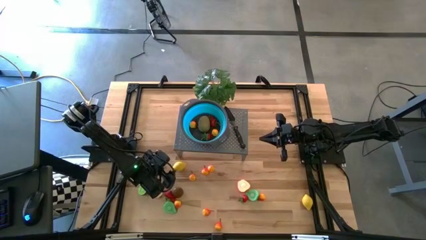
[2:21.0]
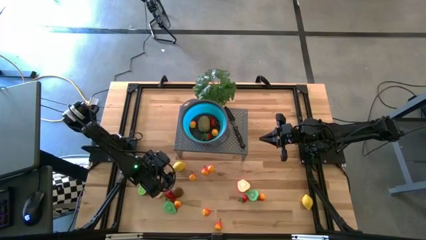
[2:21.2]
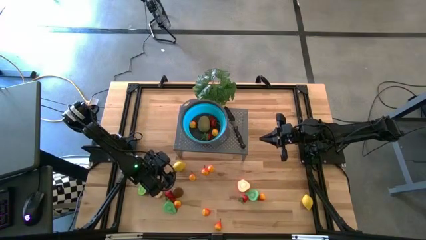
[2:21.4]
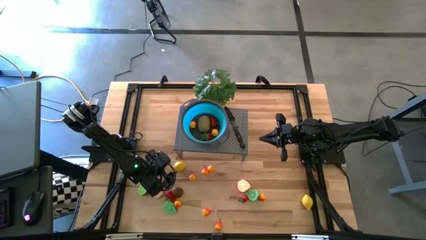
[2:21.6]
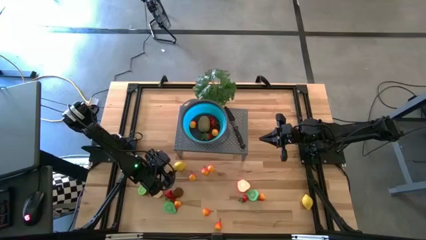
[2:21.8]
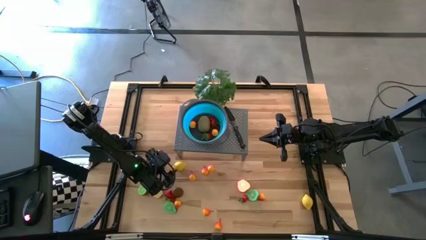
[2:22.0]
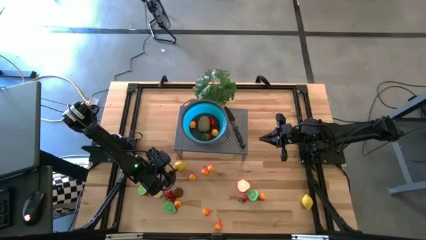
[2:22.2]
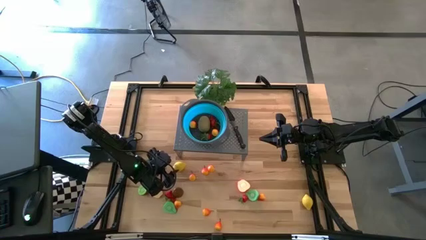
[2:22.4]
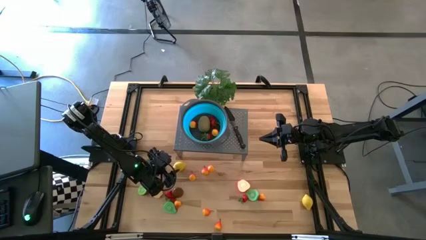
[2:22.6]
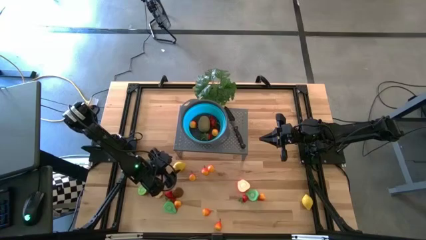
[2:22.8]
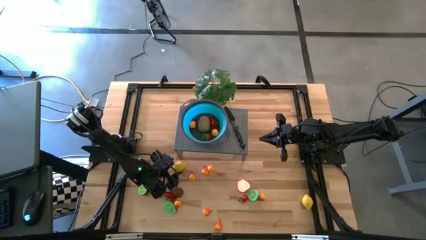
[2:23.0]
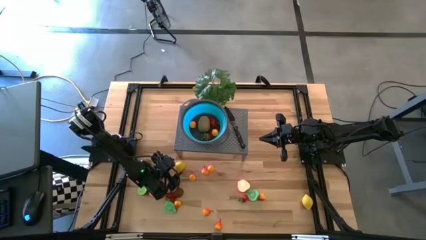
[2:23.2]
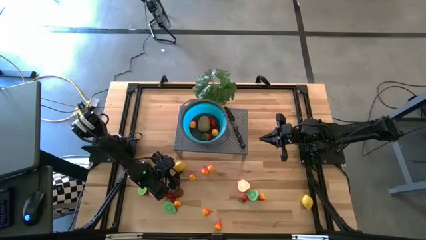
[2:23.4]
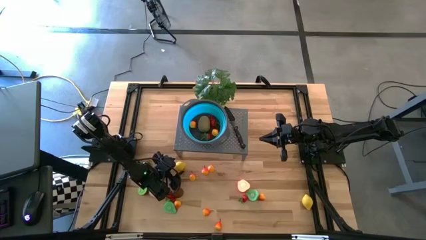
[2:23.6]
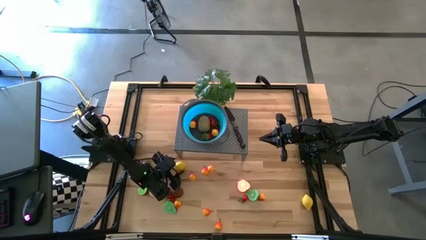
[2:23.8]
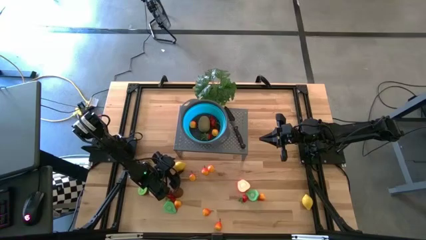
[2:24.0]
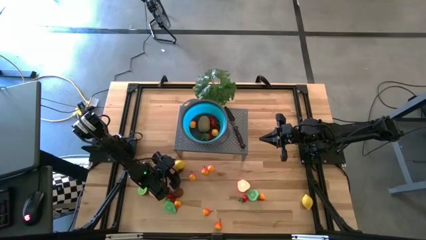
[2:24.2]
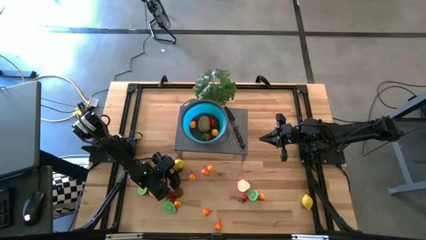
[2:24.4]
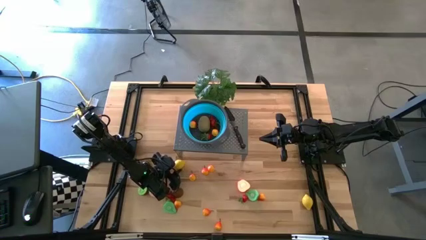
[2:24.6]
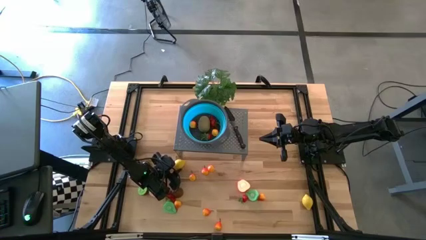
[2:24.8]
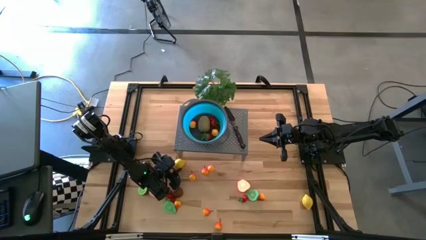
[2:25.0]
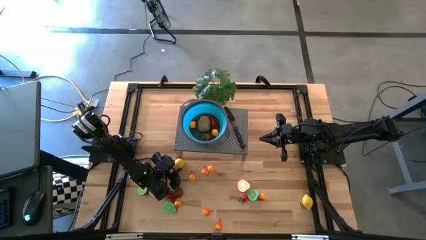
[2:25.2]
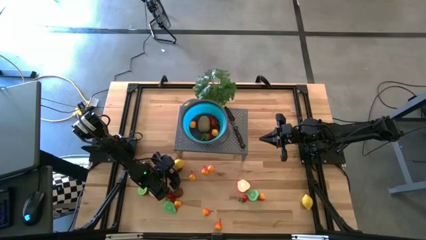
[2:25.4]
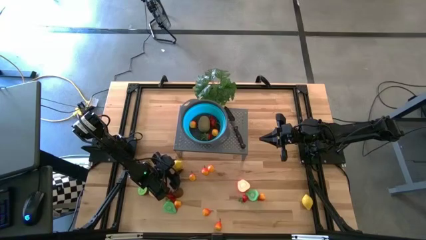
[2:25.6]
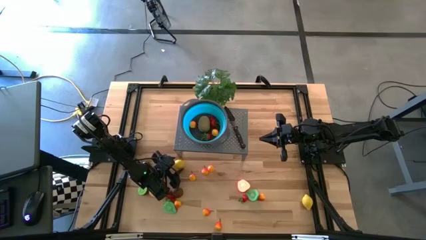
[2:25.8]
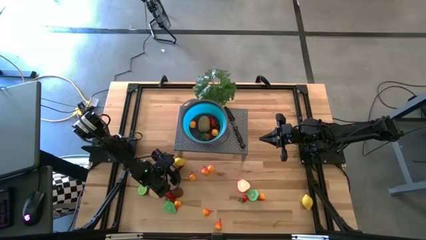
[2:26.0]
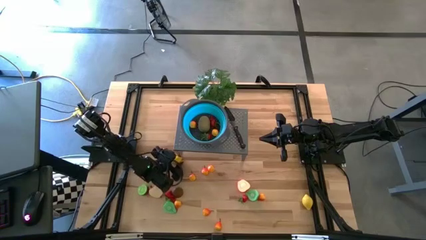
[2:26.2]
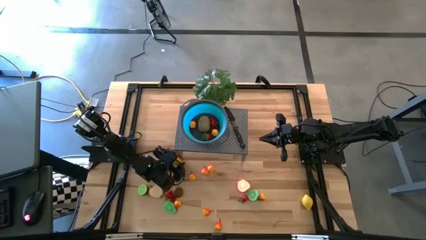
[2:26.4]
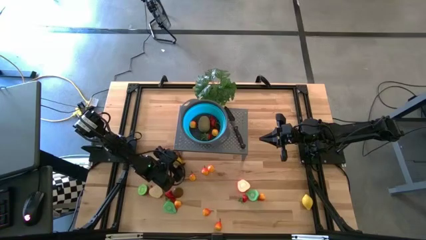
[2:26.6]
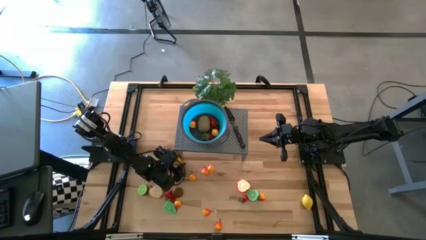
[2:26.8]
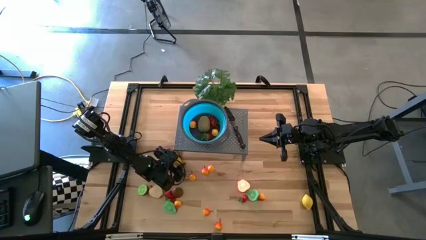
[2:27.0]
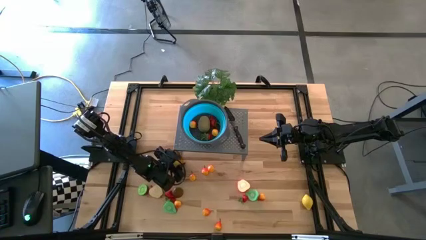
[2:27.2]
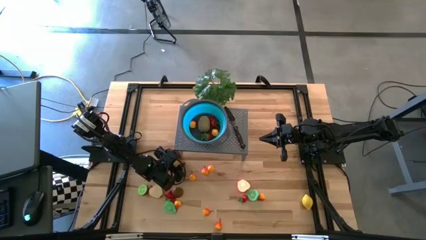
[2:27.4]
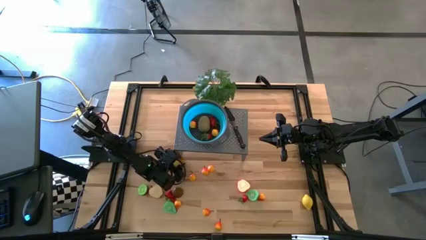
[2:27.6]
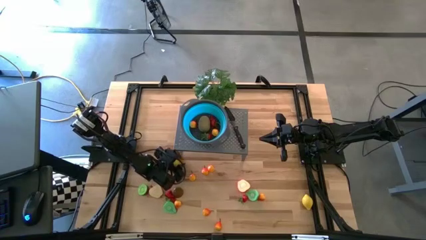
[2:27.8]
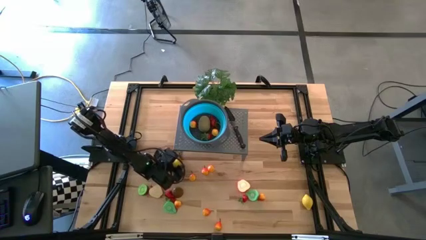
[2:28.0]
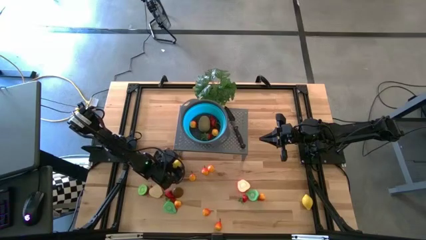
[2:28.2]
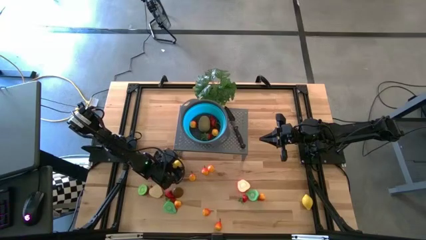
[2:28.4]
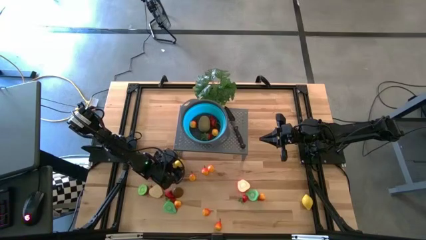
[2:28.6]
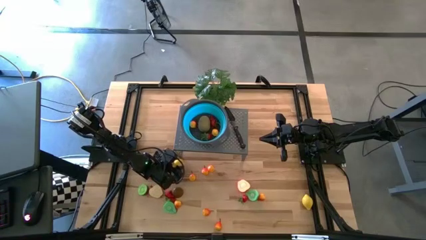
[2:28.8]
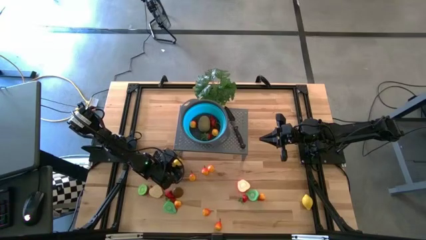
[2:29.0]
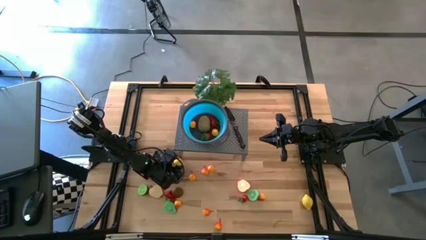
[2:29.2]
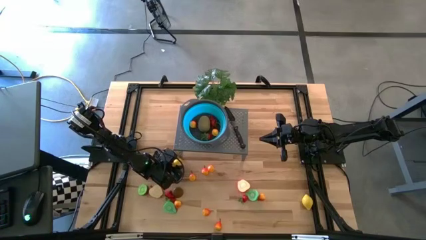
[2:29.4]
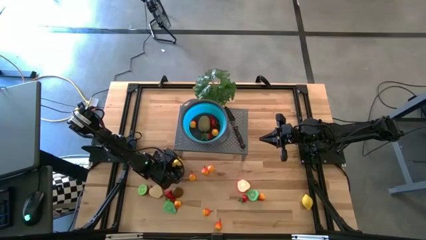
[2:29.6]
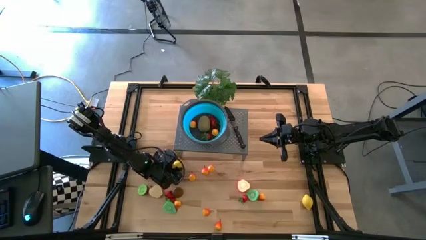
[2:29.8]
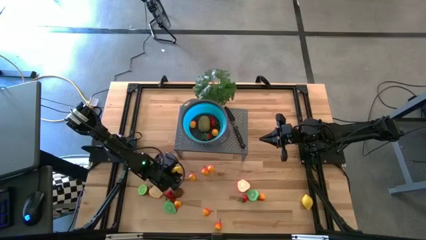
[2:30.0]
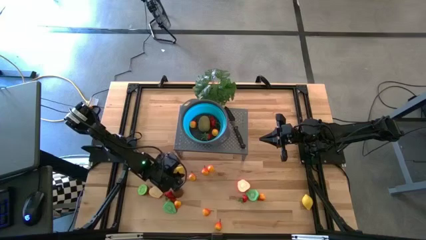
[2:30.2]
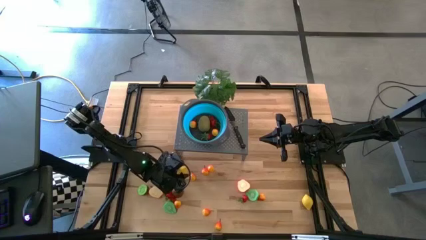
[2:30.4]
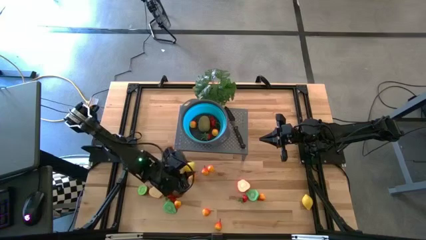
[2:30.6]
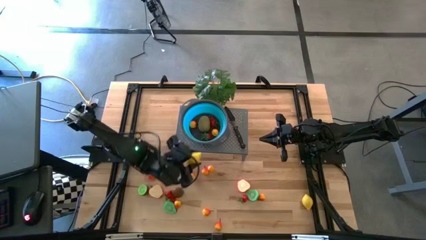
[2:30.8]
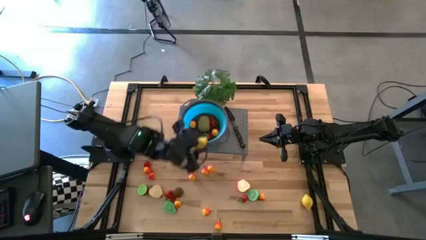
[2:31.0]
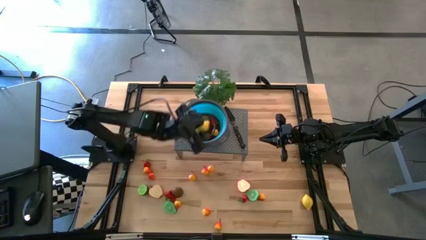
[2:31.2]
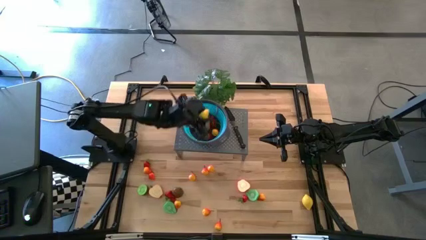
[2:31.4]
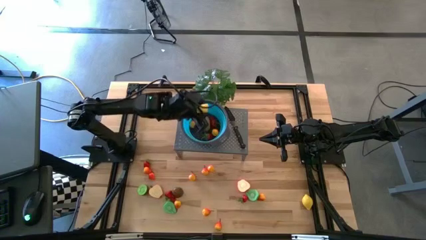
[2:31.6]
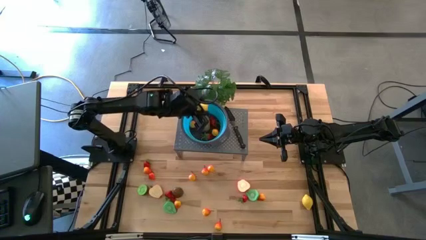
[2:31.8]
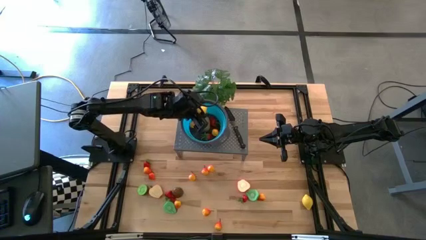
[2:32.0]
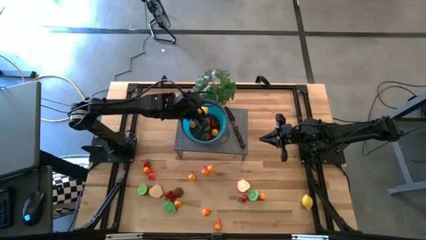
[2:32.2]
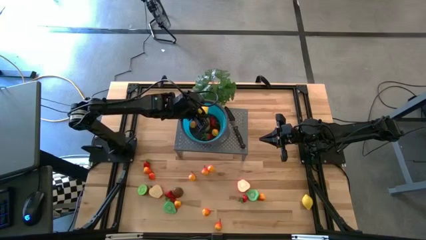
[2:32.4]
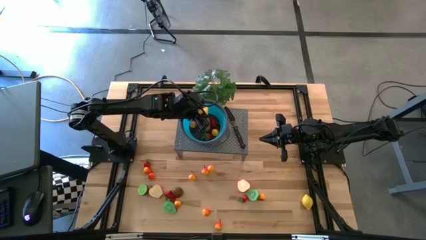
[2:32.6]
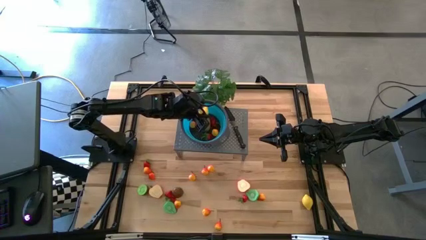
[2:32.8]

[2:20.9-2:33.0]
Task: Pick & Place Fruit
Put the lemon into the blue strainer bowl on the shelf
